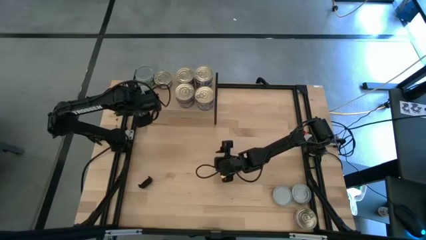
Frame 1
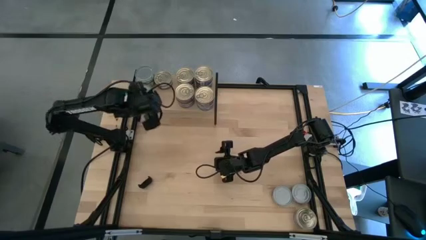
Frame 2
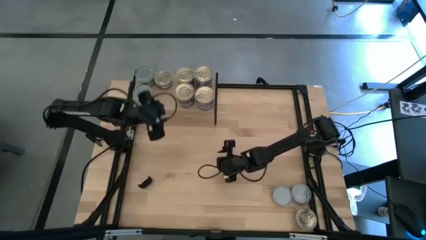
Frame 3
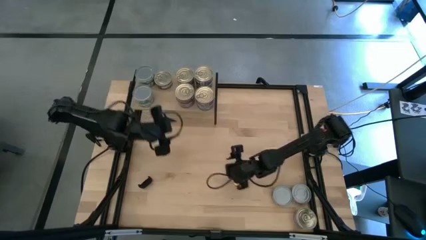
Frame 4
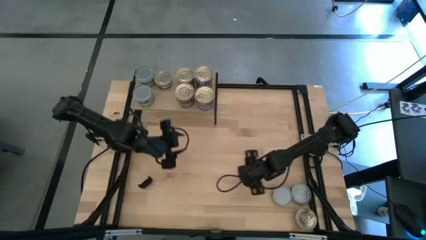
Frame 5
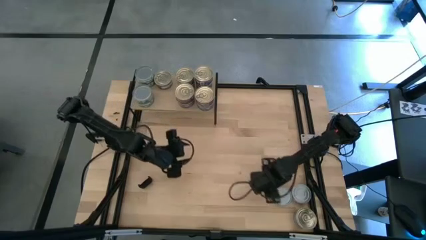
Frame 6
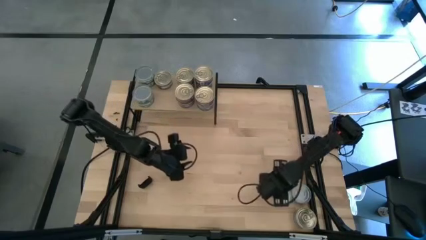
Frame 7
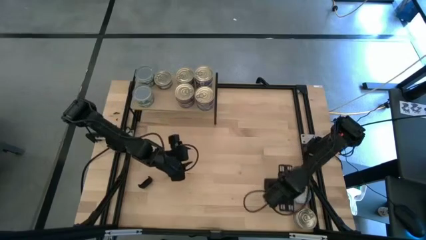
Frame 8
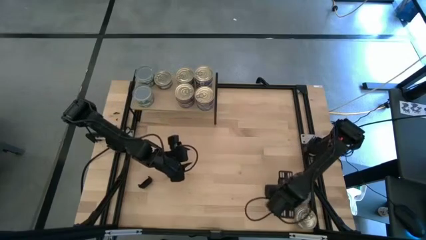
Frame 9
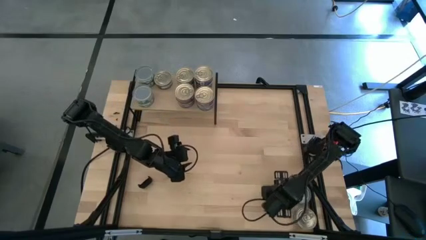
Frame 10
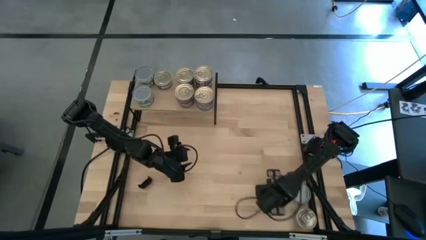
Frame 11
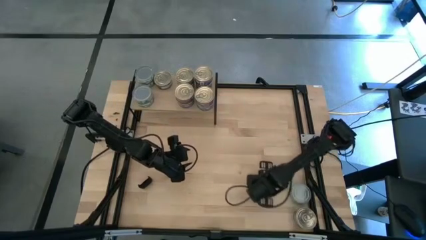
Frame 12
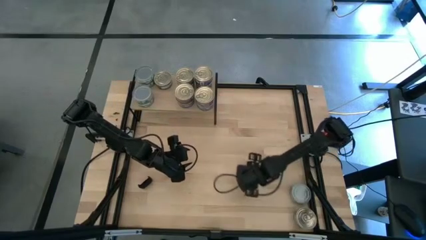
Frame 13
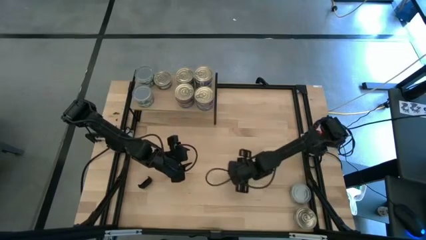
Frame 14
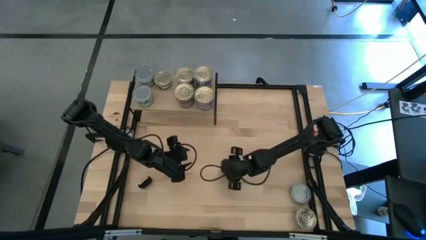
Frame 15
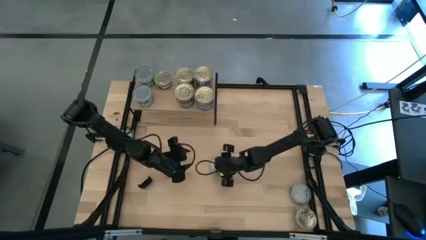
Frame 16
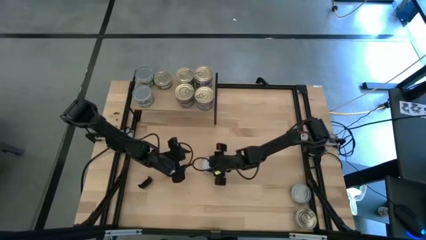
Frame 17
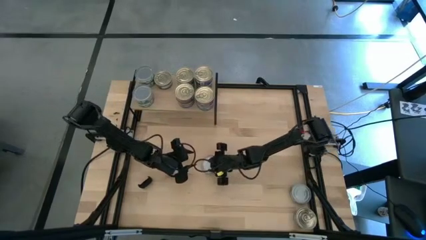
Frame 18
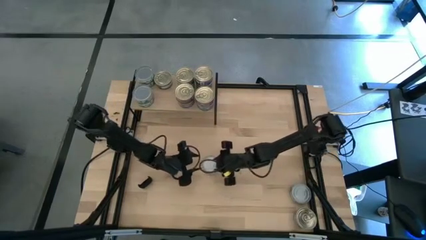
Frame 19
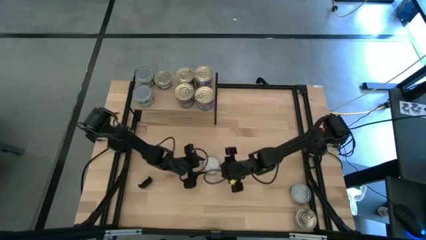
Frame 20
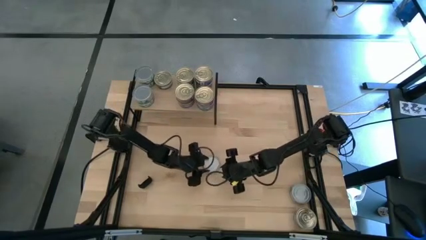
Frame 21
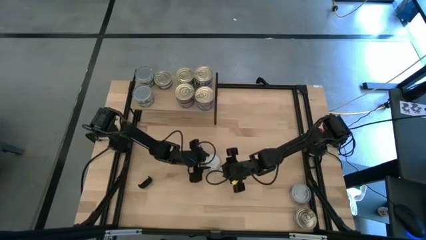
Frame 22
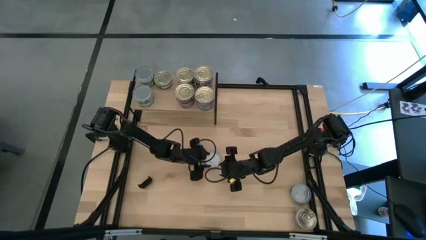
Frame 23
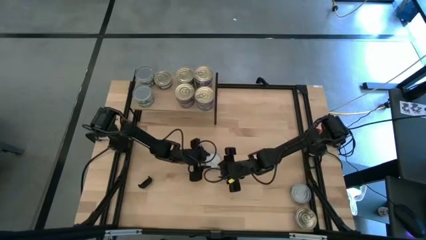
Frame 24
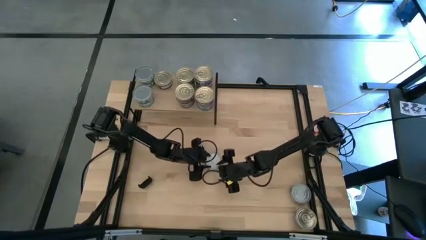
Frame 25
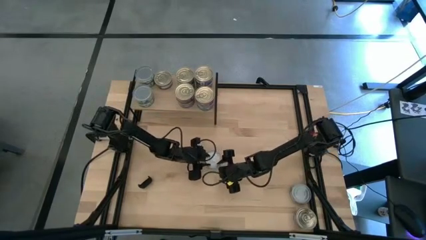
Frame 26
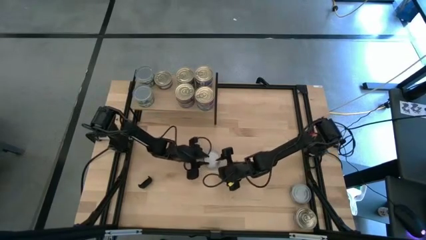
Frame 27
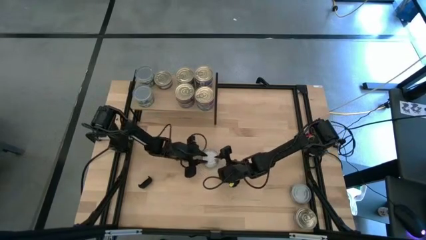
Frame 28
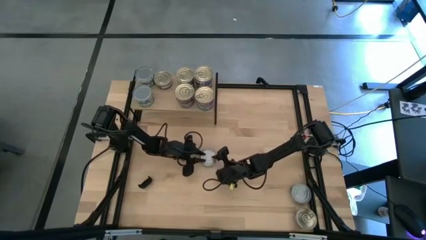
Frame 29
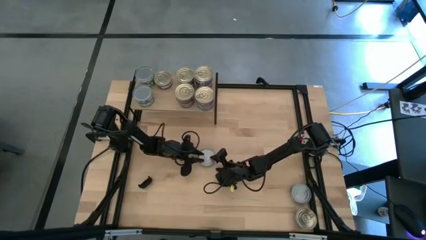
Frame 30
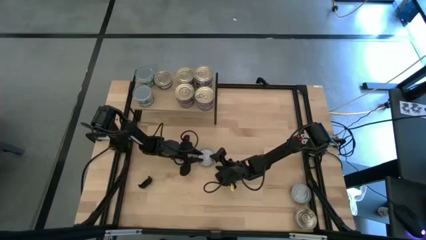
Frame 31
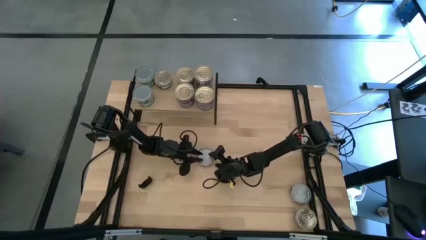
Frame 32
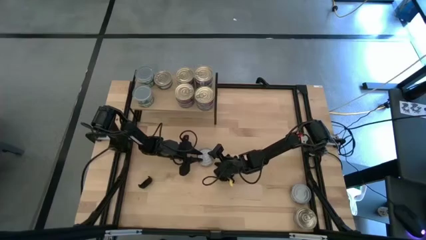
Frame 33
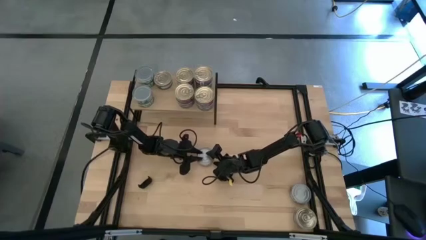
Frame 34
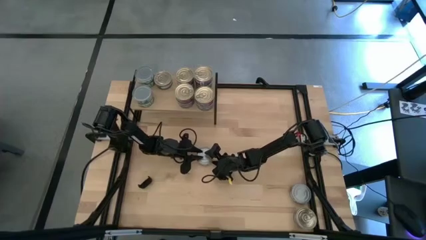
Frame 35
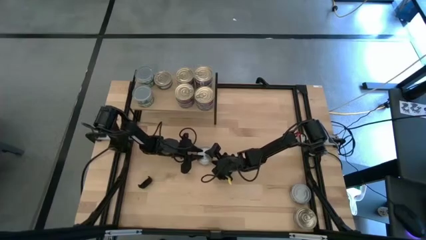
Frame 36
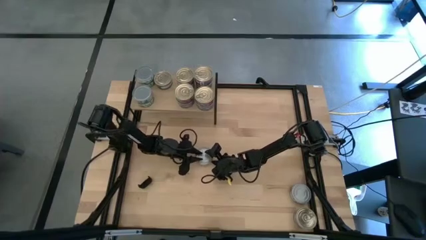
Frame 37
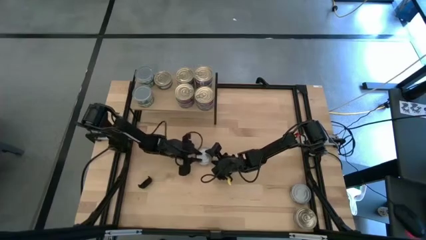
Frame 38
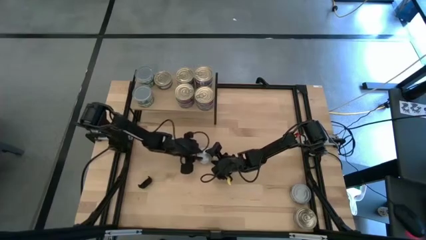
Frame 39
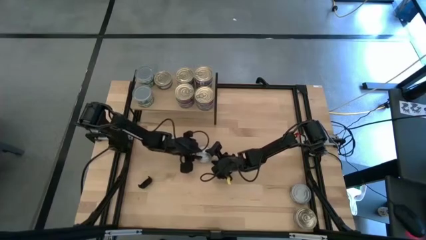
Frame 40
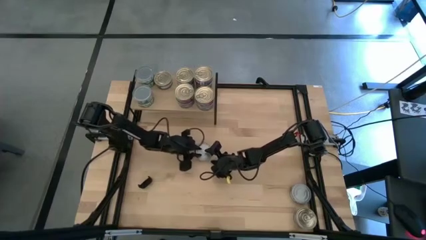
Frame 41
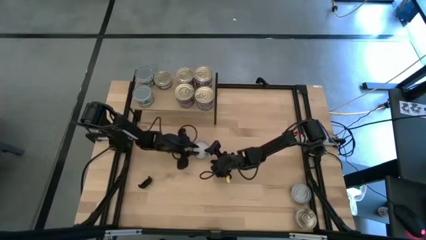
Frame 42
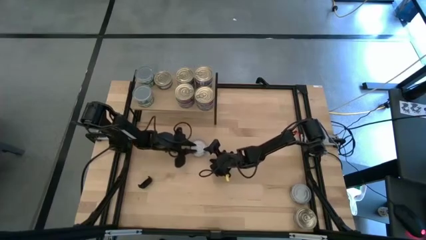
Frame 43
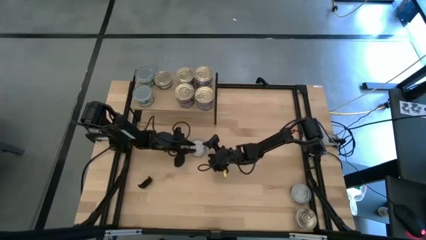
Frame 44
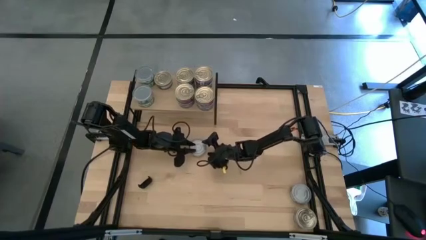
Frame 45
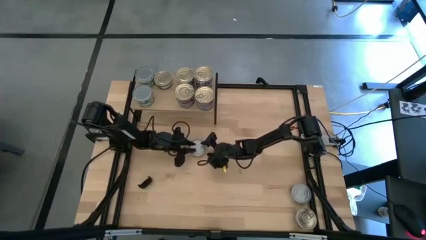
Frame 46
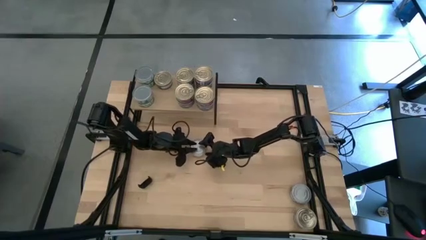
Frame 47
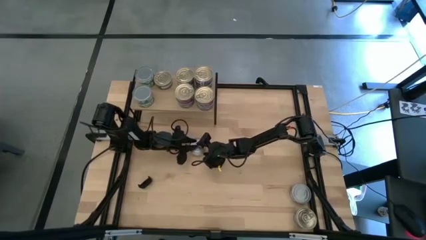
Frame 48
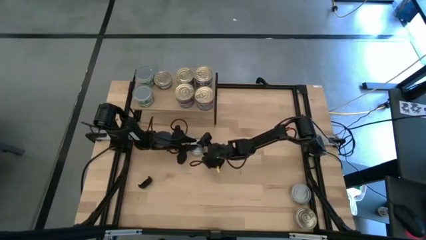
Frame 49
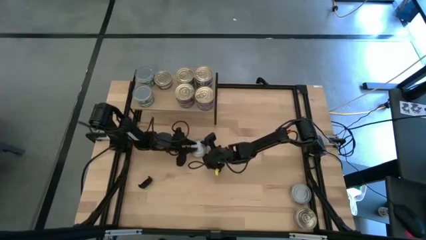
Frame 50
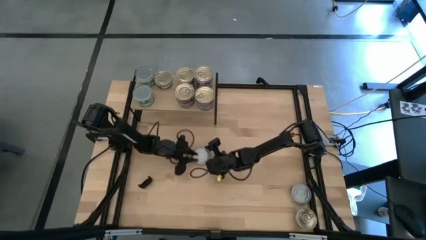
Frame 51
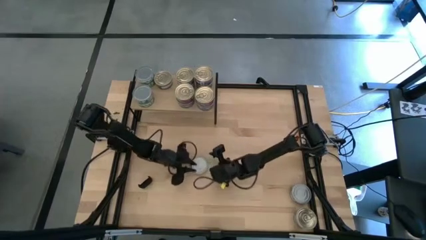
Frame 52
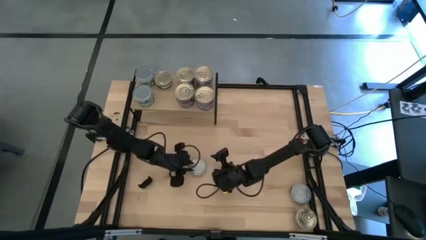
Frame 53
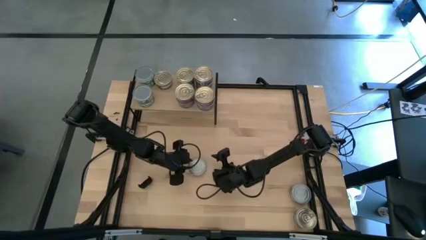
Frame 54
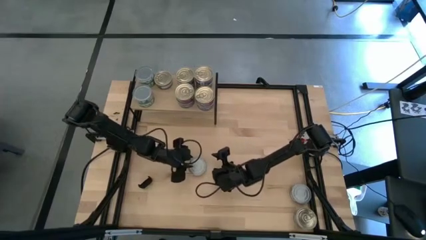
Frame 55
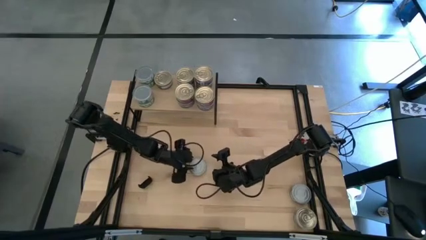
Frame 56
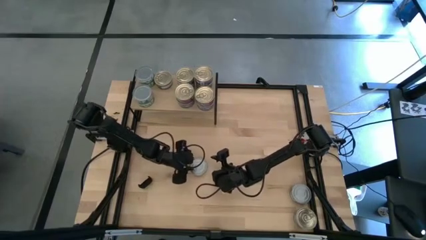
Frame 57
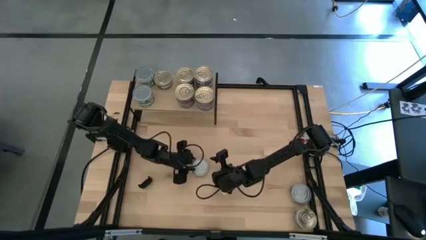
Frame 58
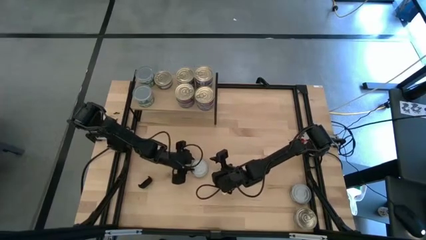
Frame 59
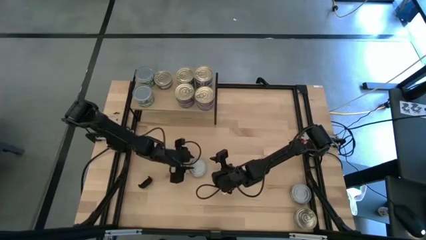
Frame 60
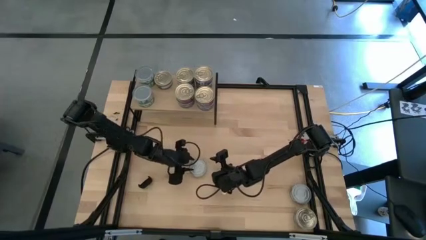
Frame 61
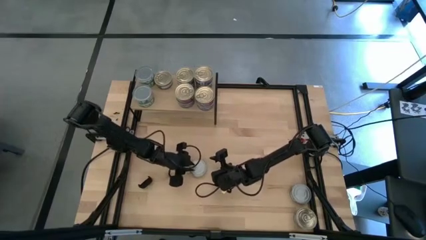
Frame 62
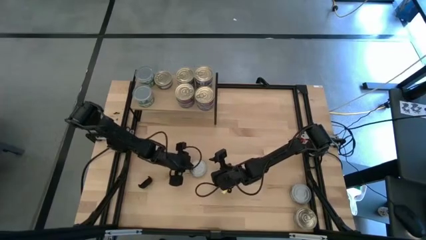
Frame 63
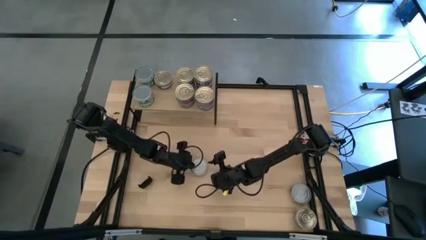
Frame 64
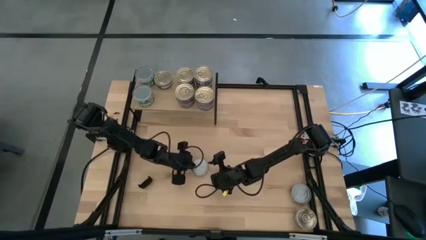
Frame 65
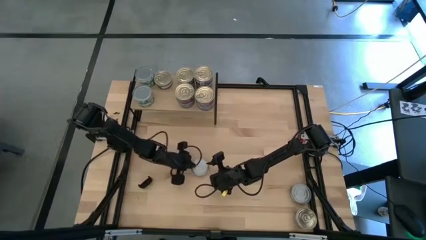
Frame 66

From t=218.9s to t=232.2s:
Task: Stack canned seafood by type on shelf
Put the green tuna can on the shelf

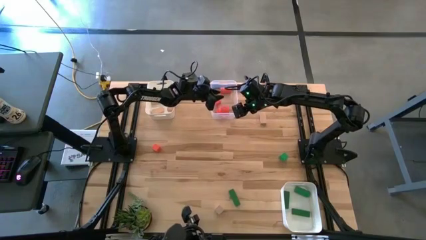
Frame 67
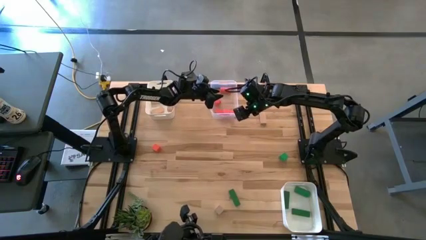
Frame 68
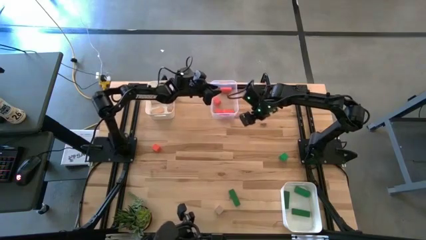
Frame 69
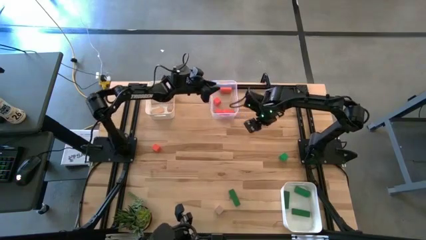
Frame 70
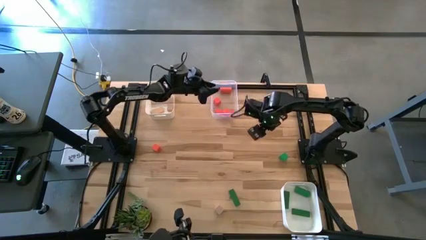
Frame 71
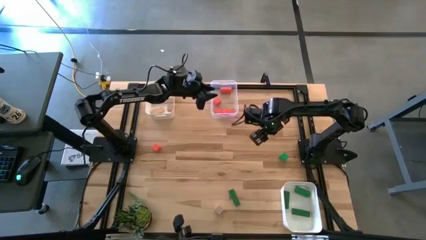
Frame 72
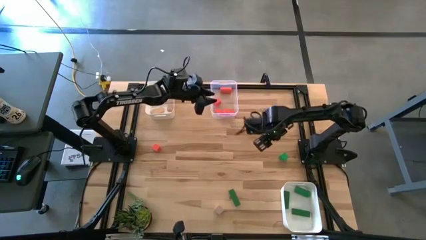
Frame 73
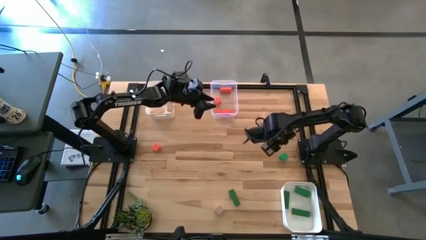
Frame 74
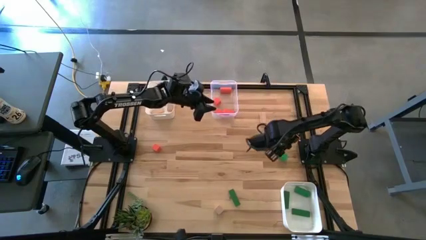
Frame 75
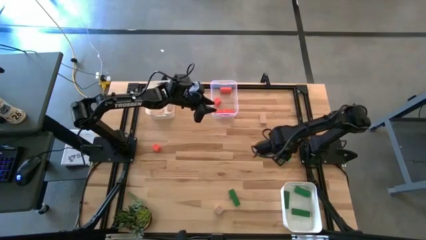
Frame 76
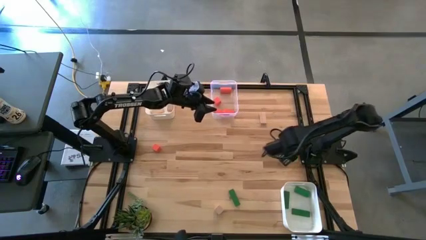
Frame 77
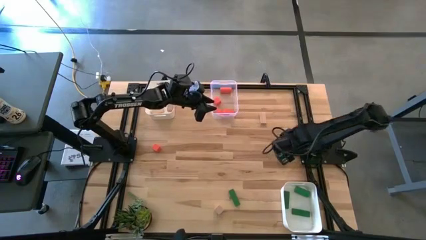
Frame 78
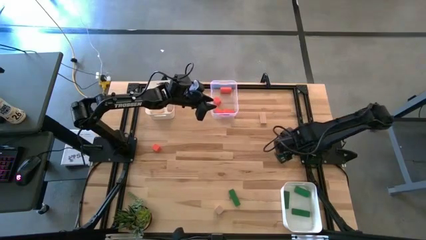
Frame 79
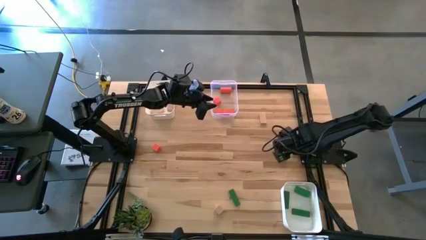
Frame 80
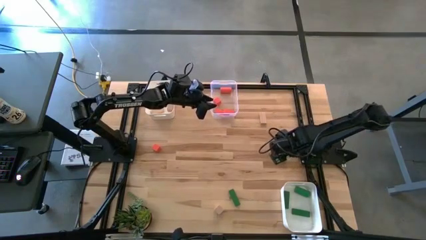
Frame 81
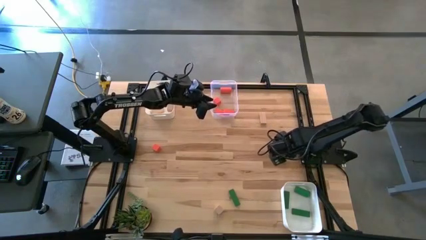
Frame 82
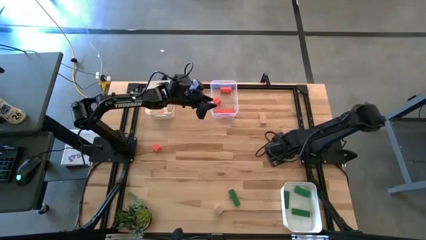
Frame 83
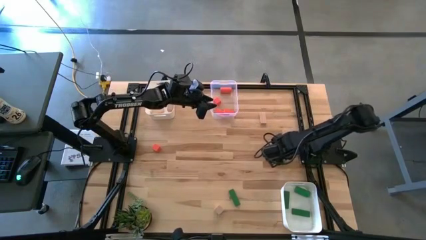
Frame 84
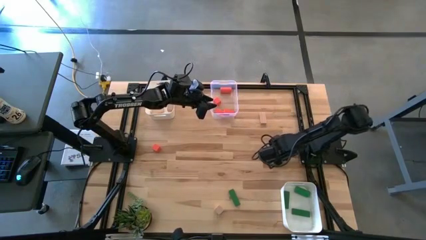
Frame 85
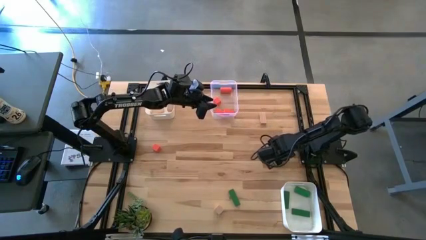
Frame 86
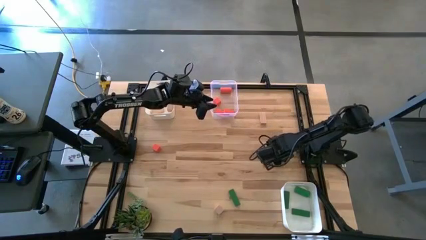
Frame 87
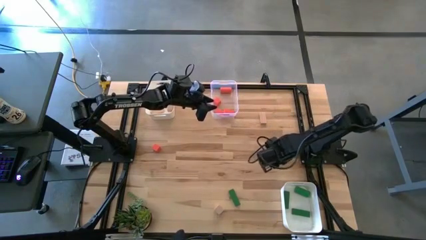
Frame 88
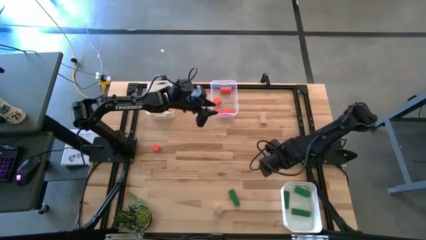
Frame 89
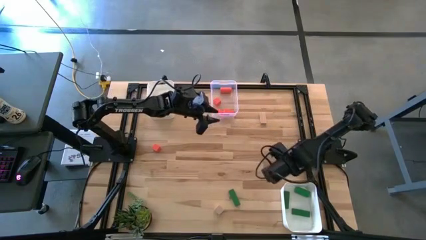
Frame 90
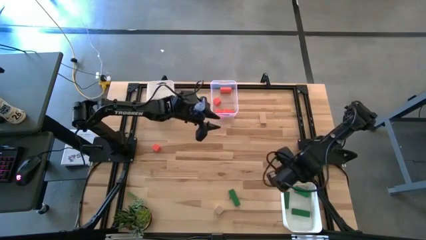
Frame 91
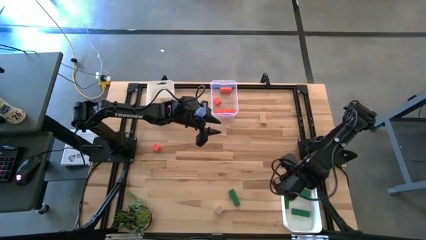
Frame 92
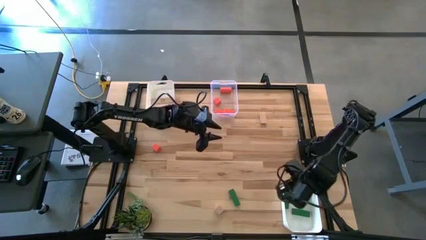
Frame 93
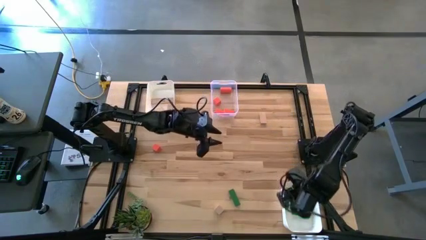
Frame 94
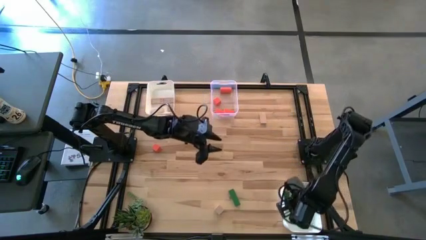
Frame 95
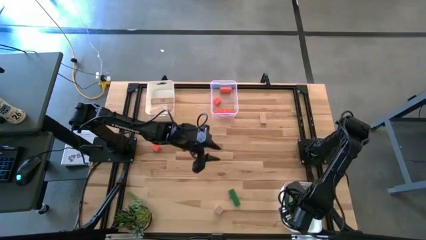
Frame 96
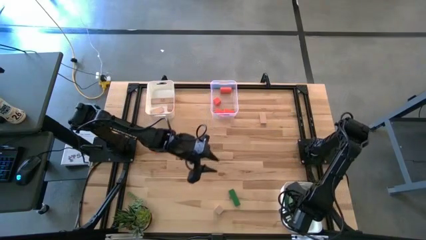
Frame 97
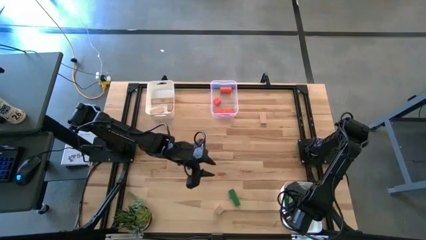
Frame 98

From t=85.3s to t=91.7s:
Task: Sort & place blocks by color
Put the green block into the bottom white bin
